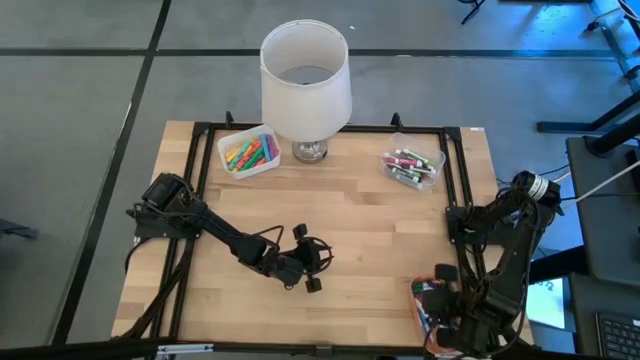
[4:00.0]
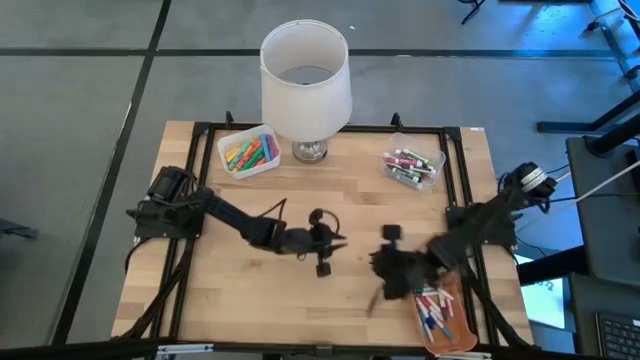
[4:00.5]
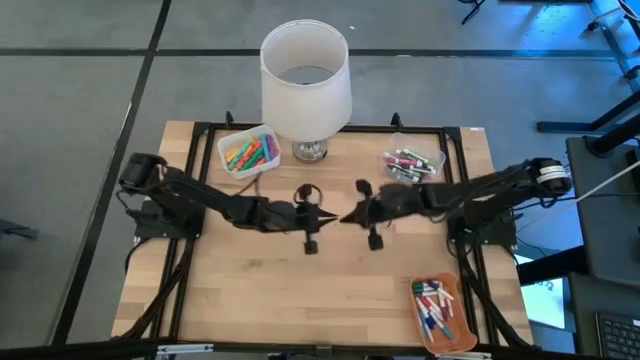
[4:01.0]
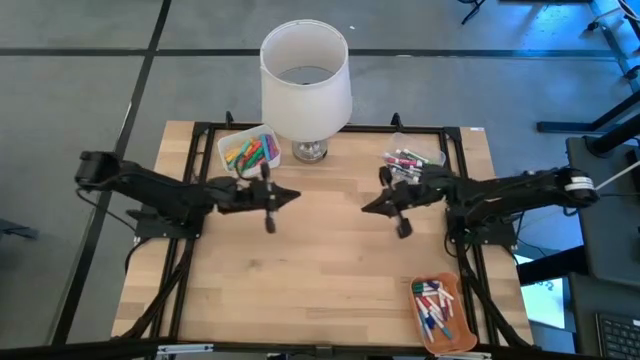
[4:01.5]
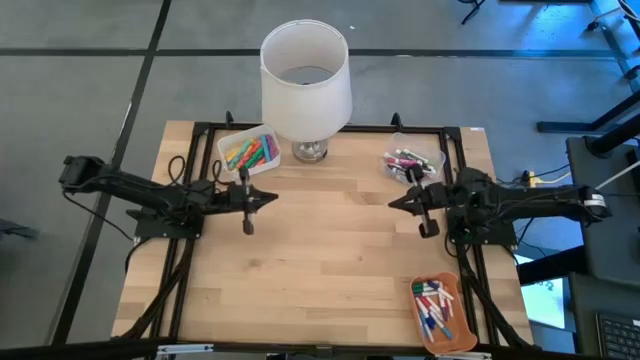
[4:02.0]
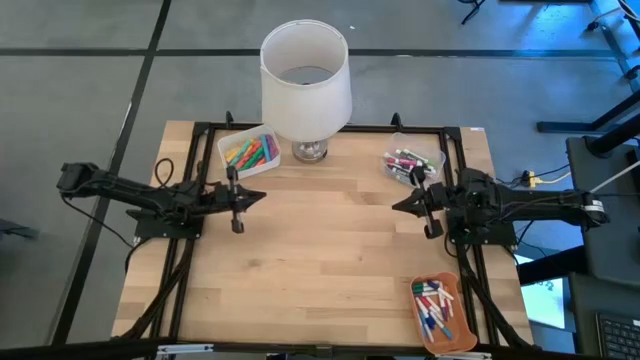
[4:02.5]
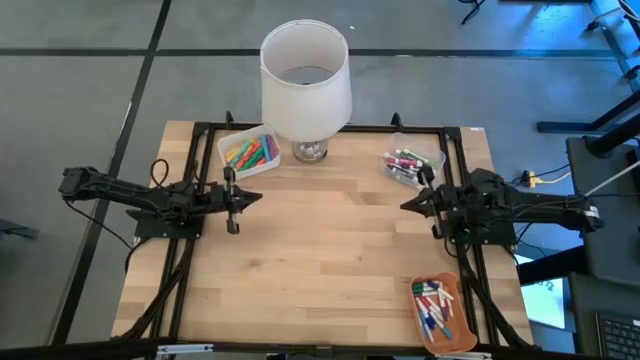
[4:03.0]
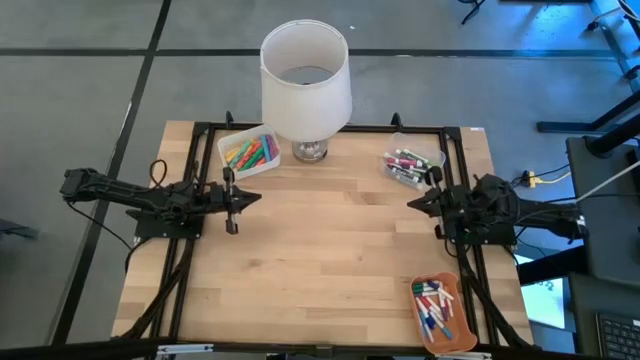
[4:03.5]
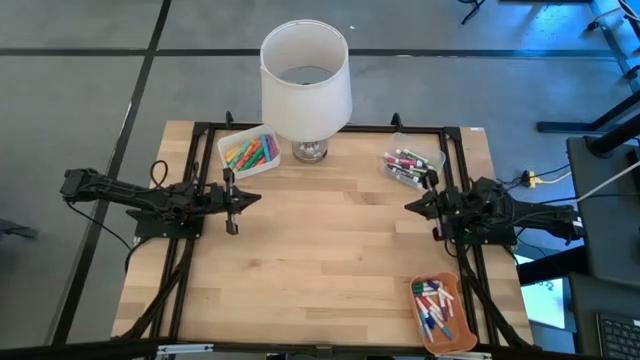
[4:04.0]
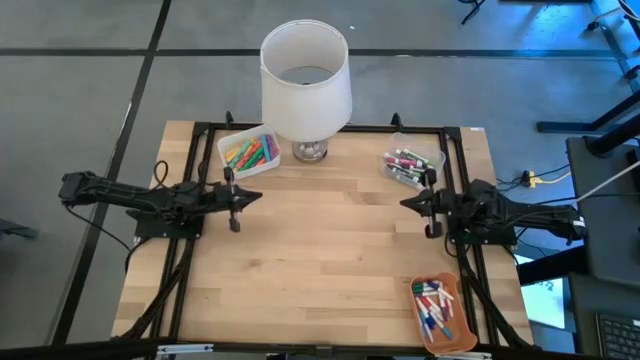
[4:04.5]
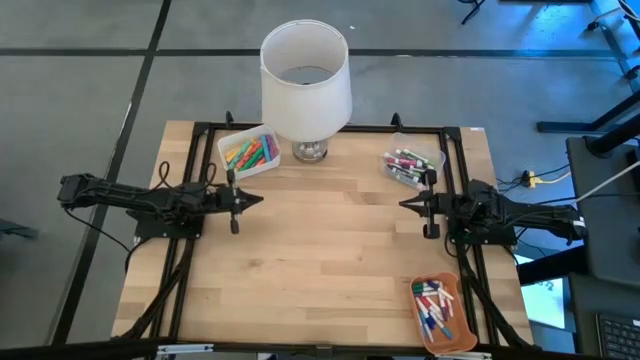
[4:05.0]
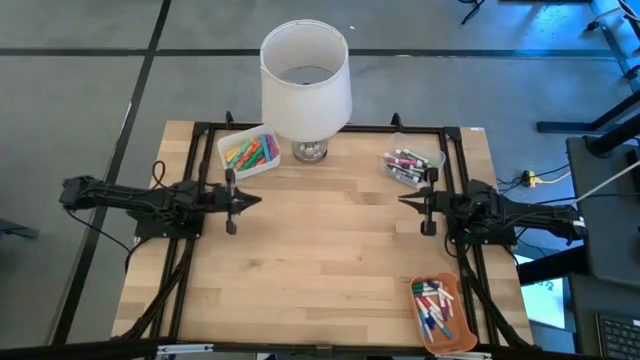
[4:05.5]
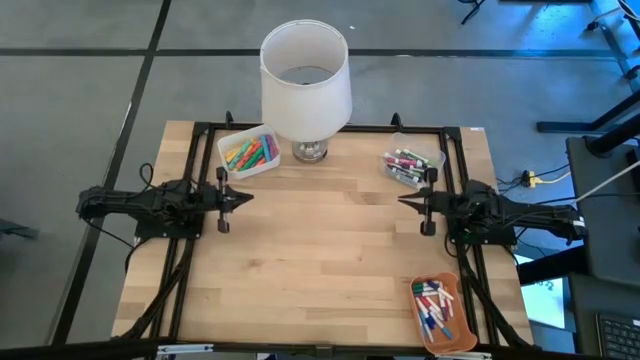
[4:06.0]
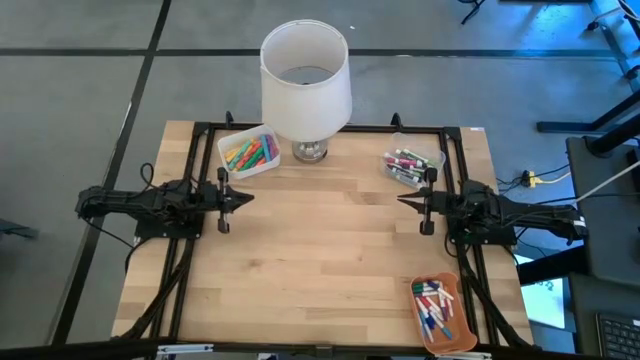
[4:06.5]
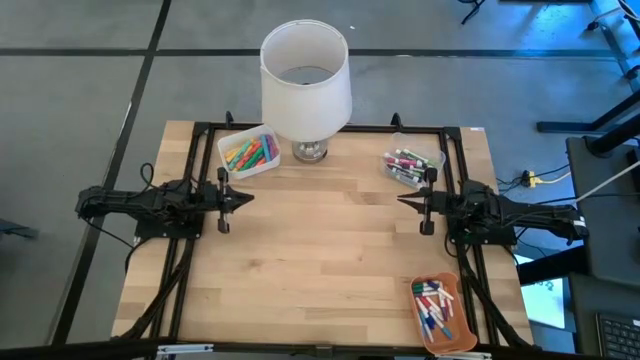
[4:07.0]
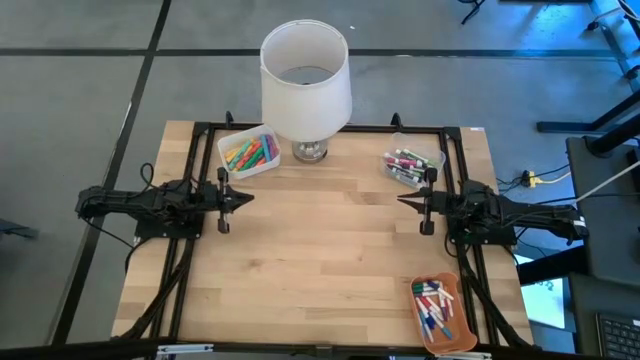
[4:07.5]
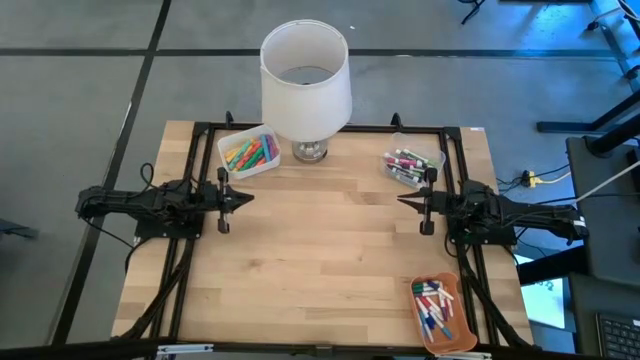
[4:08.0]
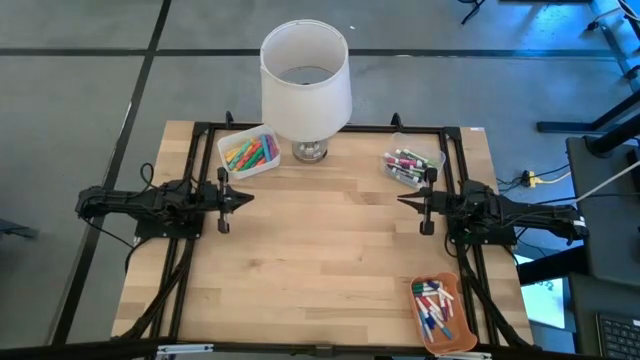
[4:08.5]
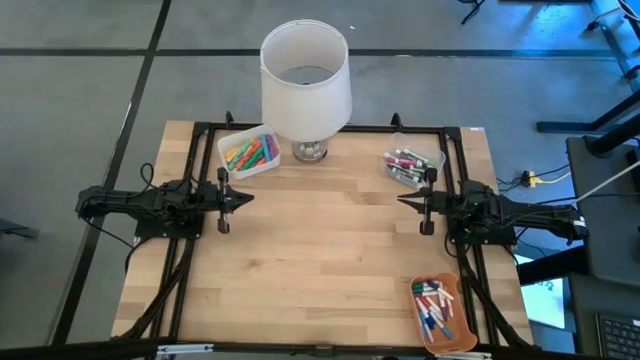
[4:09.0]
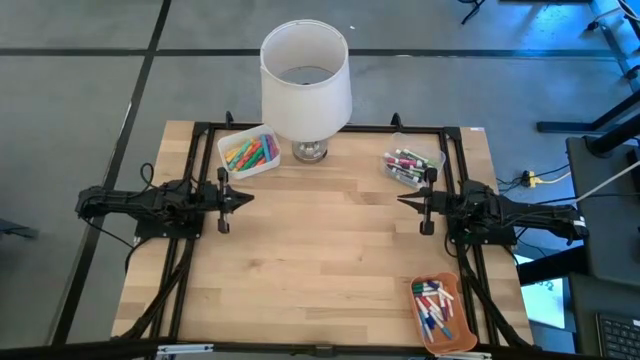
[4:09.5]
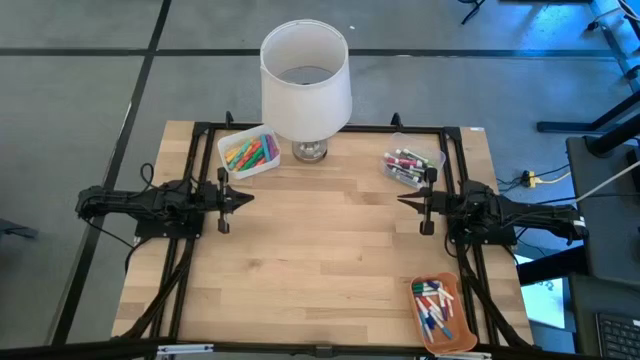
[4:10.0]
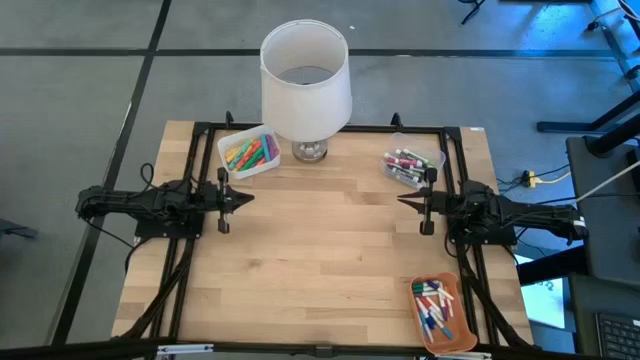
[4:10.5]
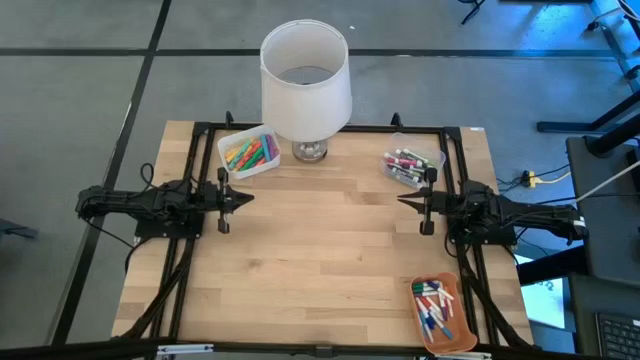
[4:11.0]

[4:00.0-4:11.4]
Task: Pick & Place Markers
Return to Home Position

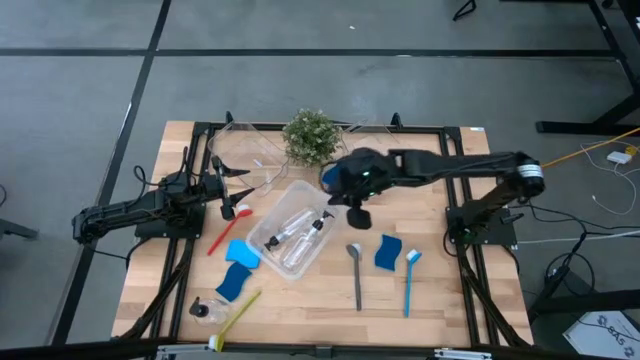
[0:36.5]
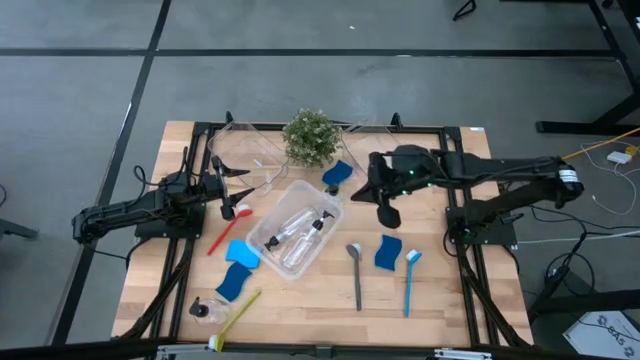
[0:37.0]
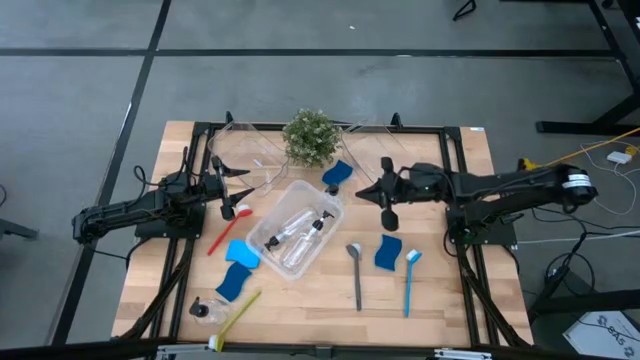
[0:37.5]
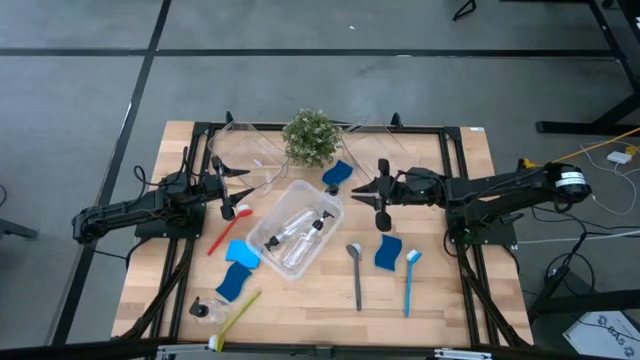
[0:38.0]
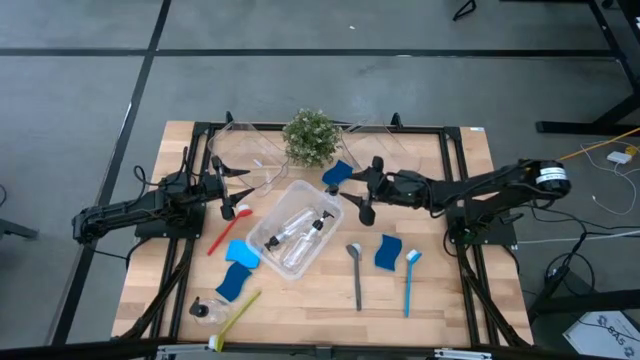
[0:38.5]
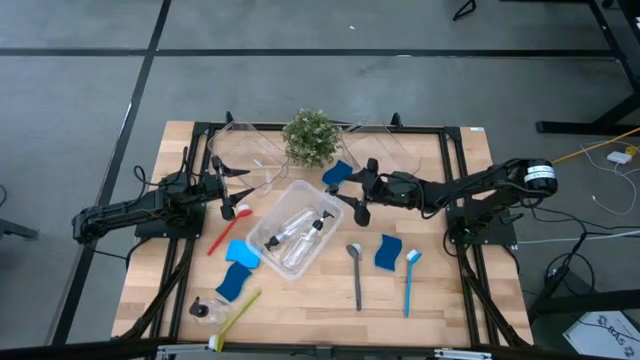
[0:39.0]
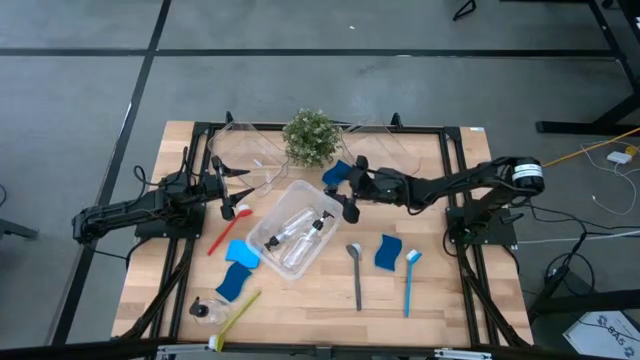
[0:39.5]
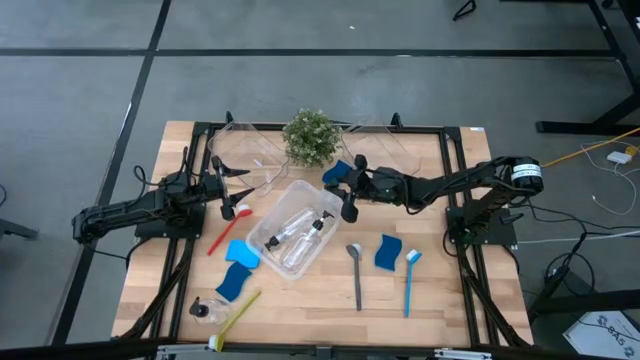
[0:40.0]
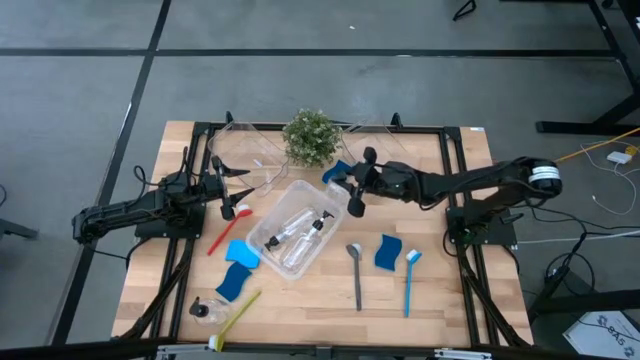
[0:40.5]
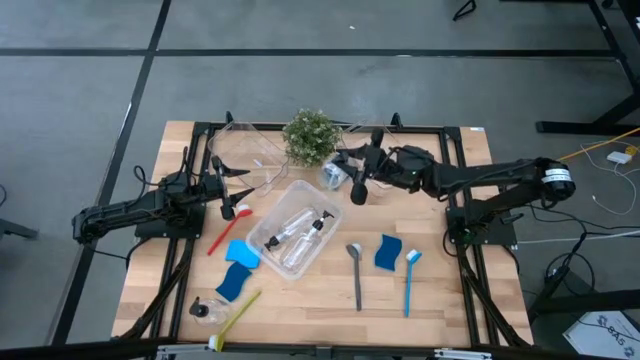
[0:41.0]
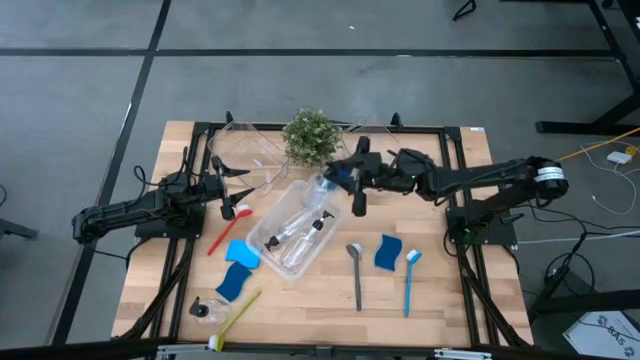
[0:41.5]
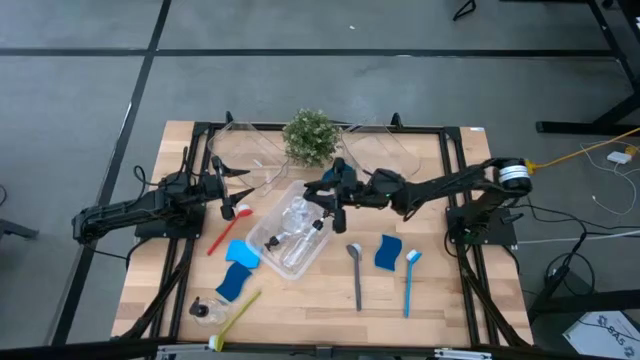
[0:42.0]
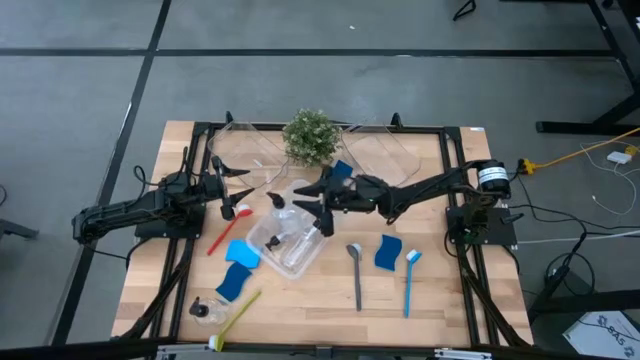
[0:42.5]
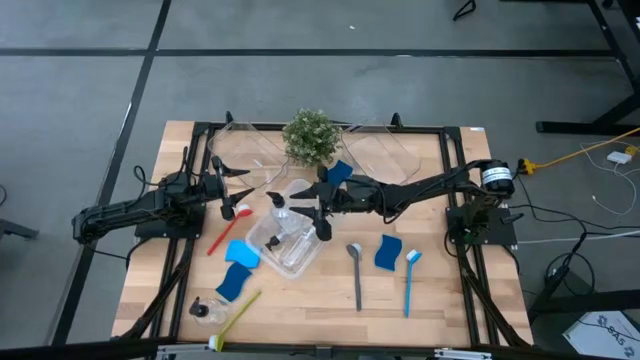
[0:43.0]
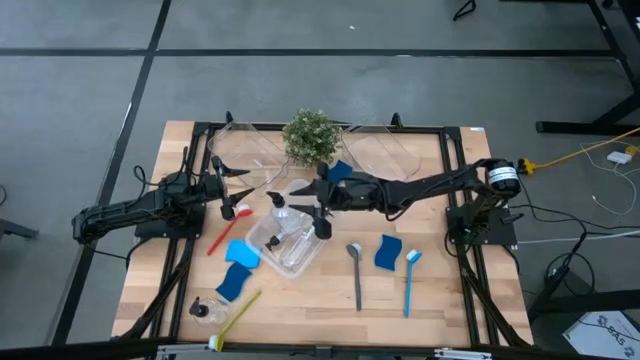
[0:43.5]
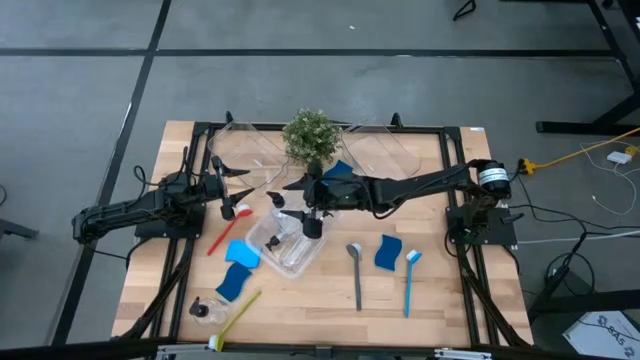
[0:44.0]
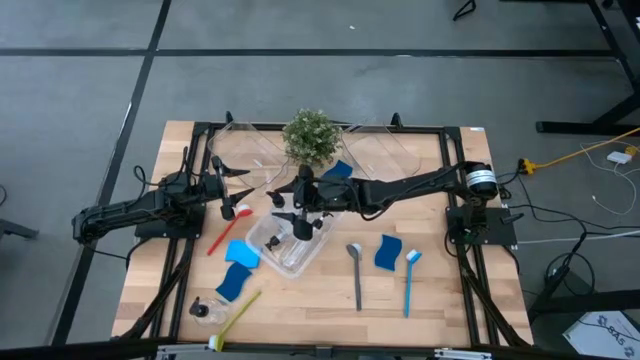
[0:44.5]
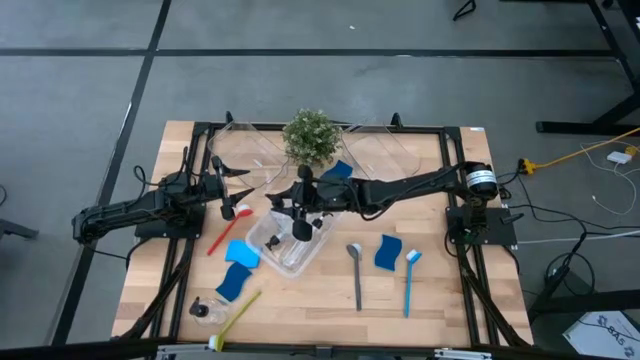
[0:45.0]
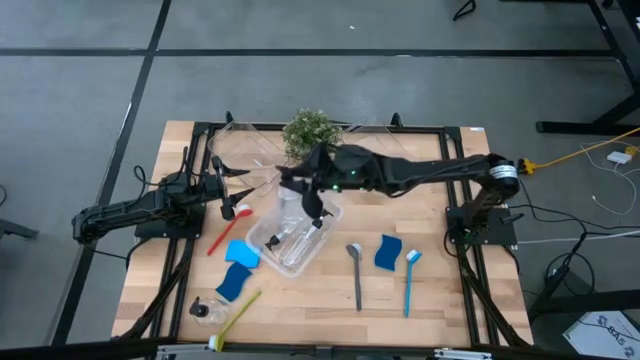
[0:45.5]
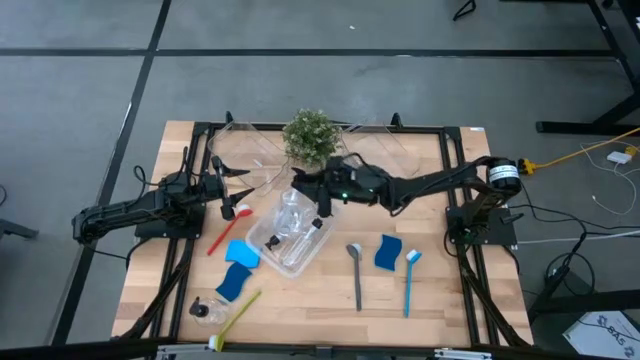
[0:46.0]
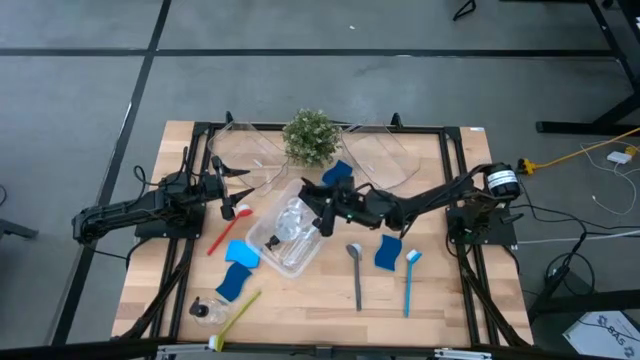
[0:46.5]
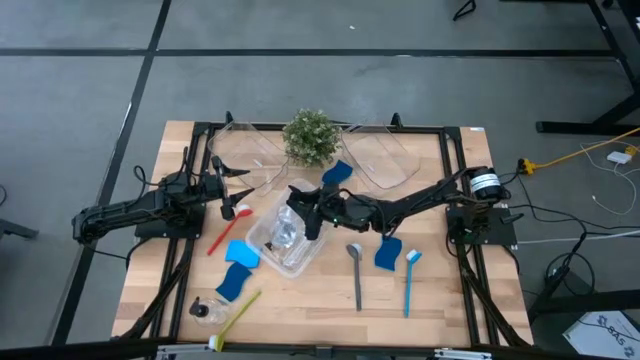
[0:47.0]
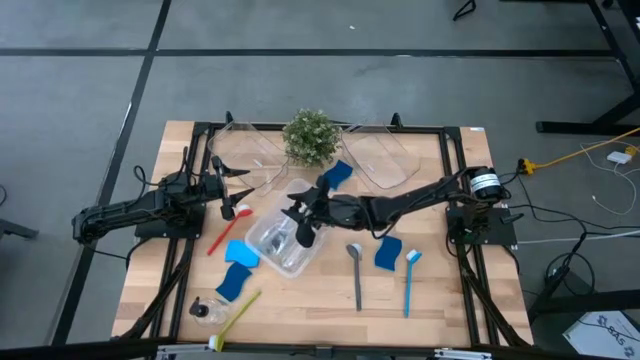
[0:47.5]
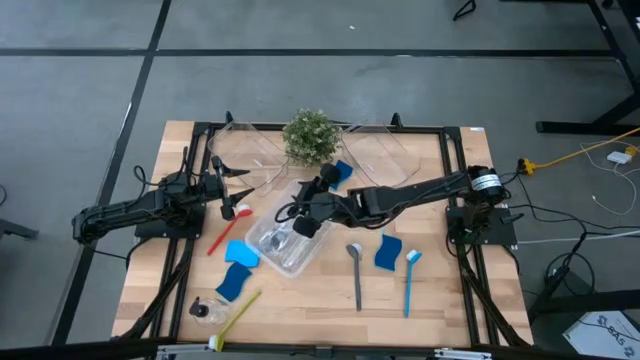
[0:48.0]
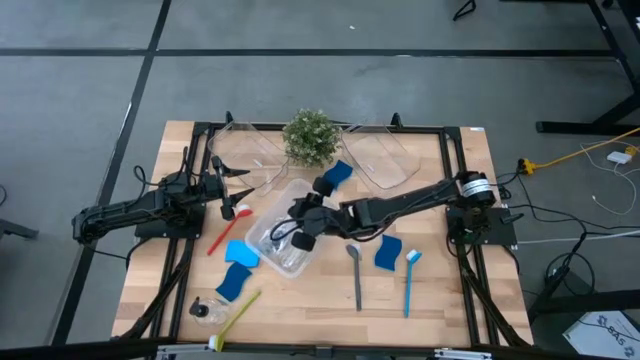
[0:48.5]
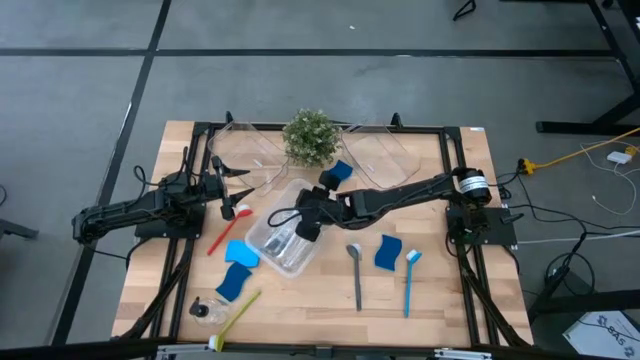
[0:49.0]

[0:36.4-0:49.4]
Task: Pick & Place Kitchen Sink Supplies
Put the liquid dispenser bottle into the white bin
